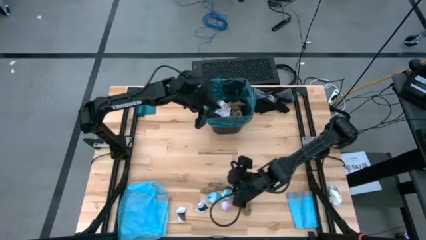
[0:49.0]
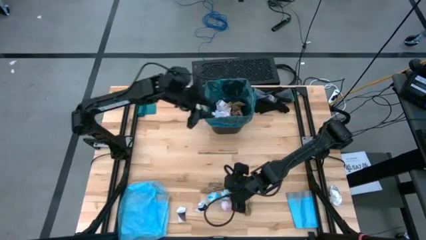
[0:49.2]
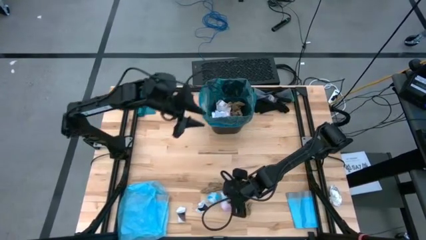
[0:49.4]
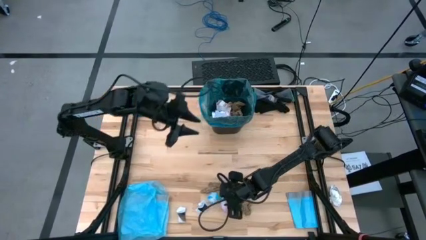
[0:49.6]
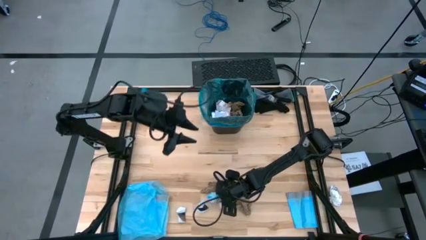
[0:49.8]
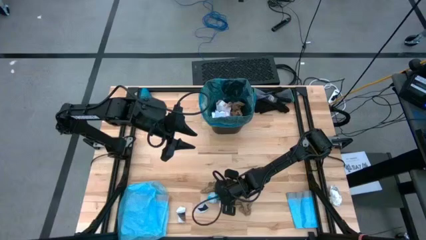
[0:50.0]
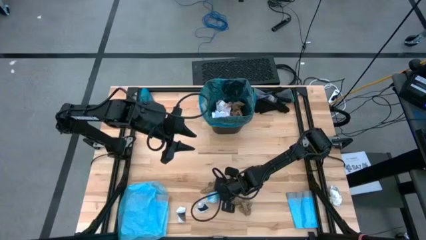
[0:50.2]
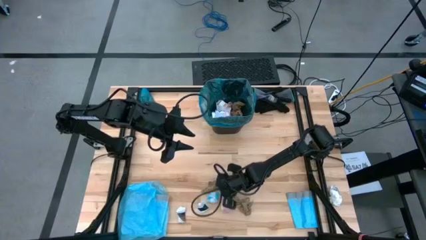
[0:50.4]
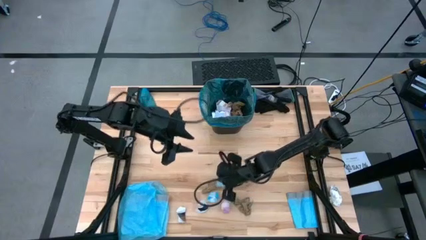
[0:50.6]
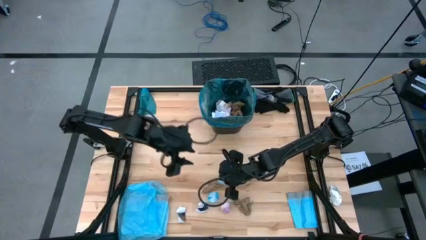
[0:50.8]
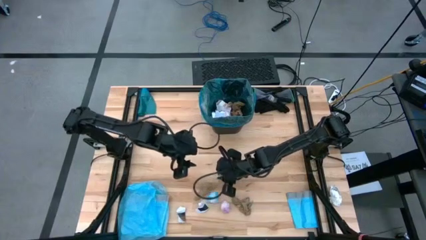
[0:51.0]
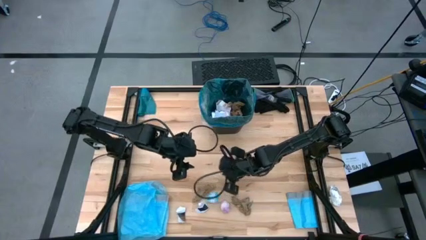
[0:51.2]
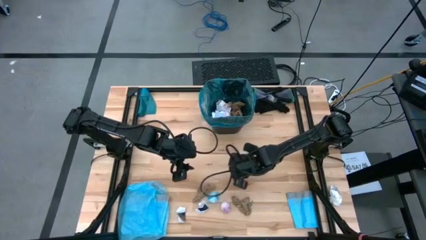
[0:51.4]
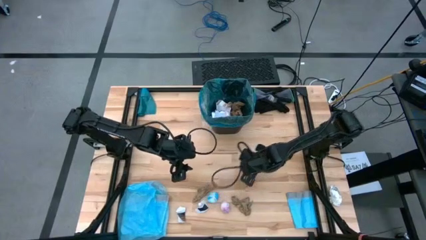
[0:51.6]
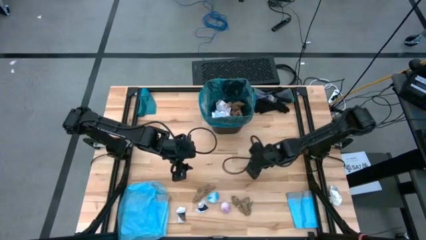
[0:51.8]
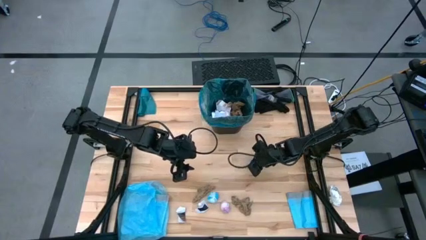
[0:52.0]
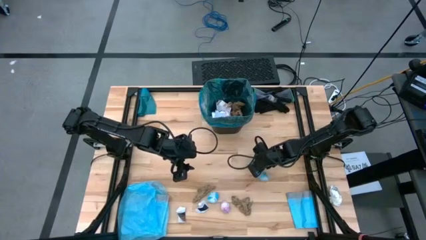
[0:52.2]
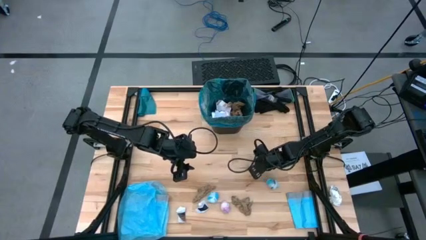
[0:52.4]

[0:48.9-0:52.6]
Task: place trash/remove bag and relplace
Put the blue plastic into the blue trash bag inside the black trash bin

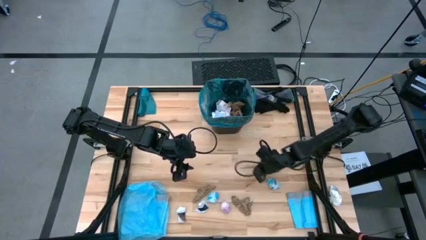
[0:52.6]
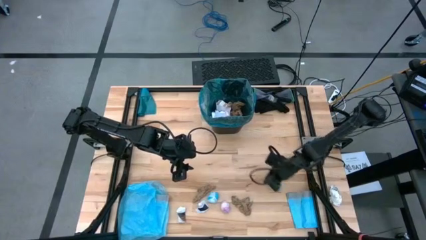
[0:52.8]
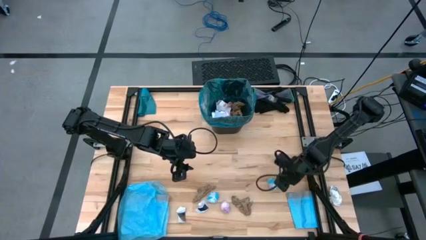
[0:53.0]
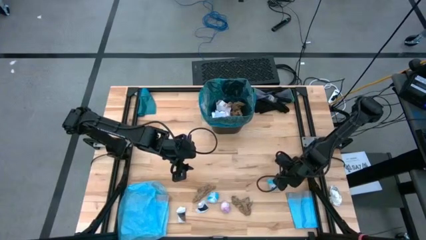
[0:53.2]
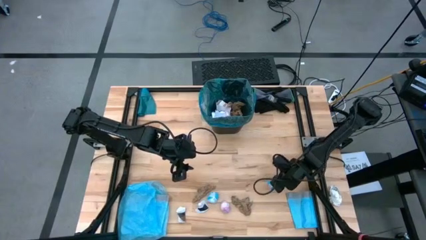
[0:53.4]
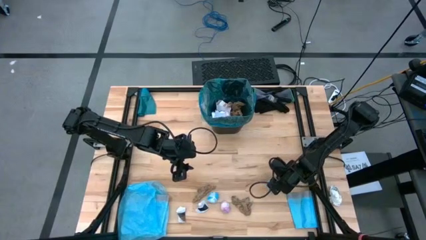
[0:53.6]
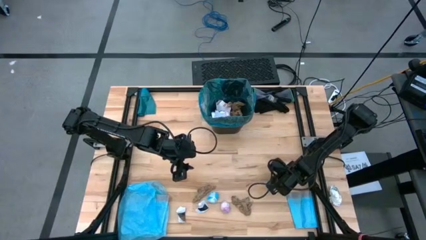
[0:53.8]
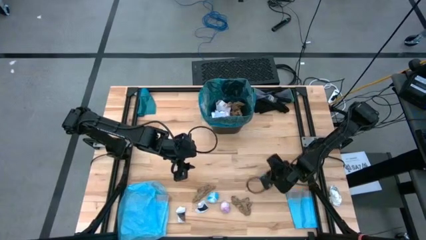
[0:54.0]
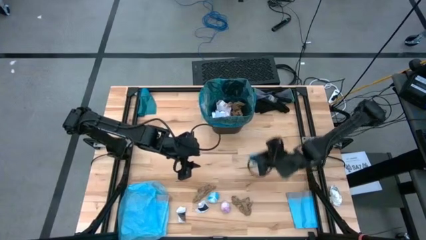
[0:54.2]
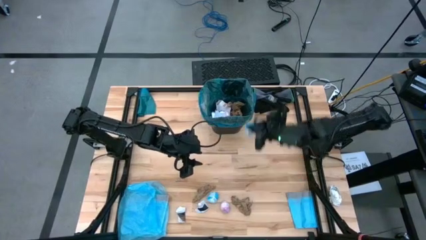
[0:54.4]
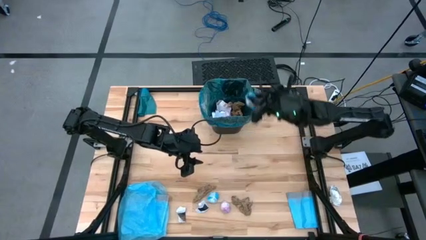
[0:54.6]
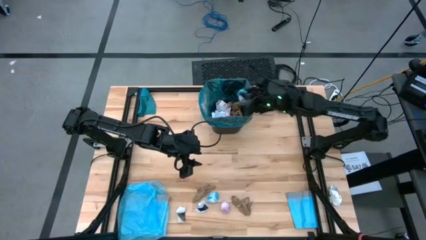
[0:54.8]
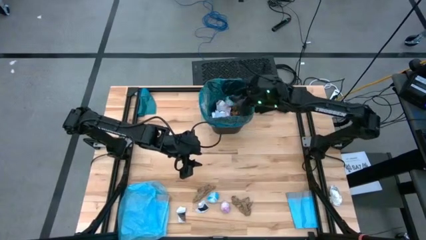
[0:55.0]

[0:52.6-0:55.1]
Put the blue plastic into the blue trash bag inside the black trash bin

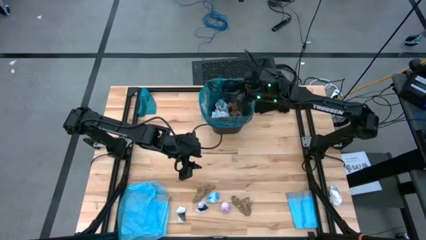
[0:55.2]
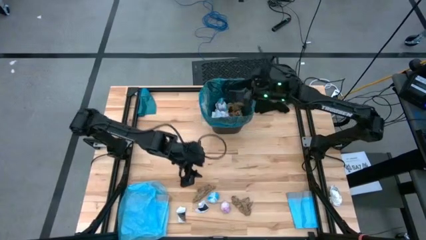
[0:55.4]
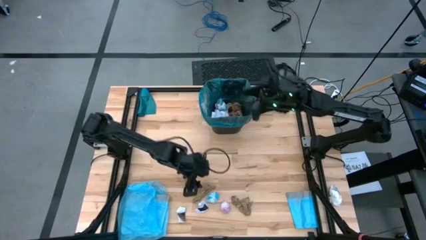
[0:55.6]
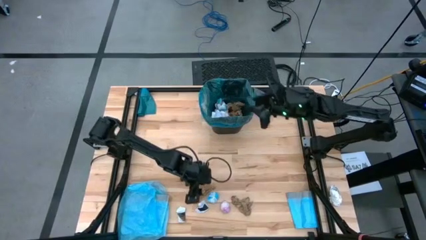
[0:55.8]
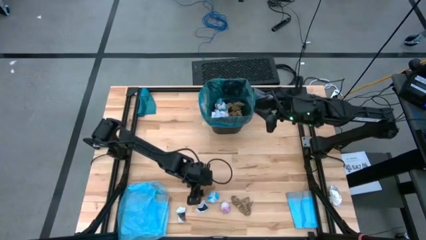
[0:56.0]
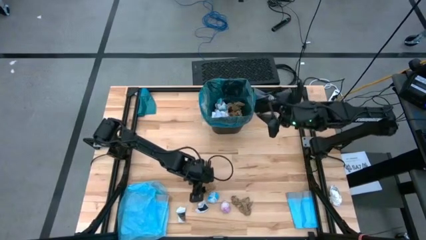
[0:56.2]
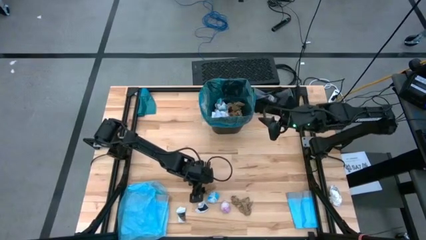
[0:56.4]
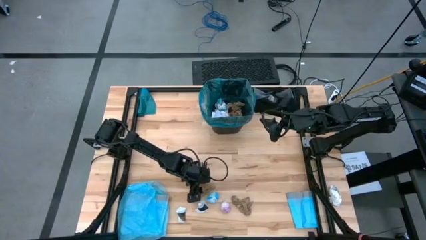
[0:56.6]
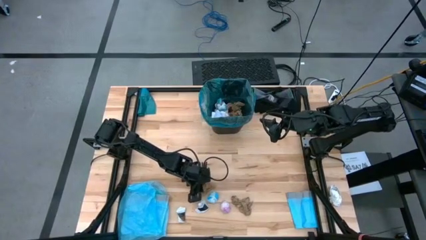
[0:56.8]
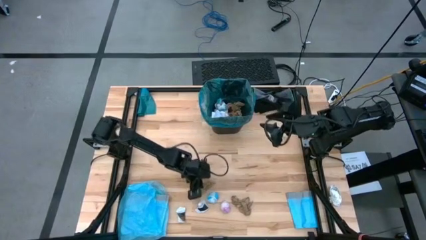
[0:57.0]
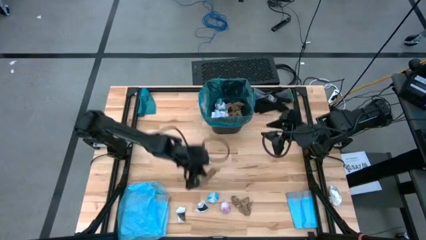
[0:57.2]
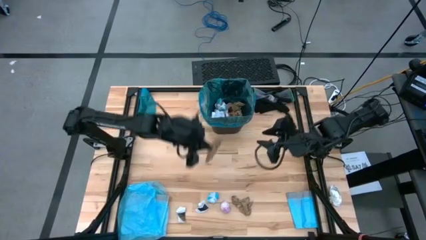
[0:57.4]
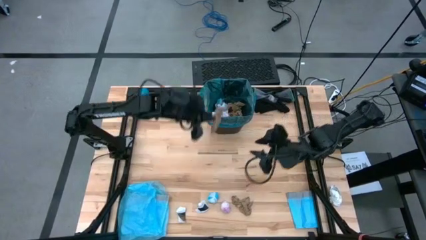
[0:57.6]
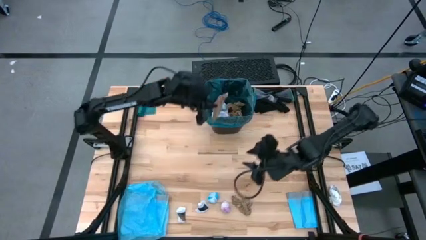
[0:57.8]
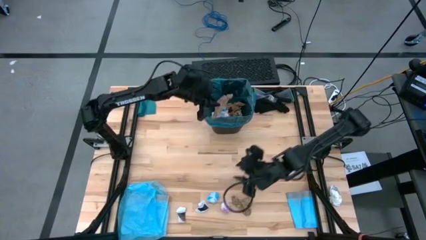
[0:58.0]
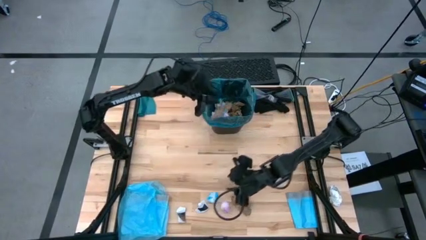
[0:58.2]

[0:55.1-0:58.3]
Put the brown napkin into the blue trash bag inside the black trash bin

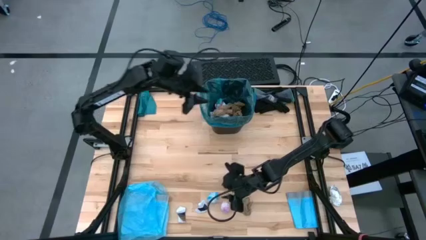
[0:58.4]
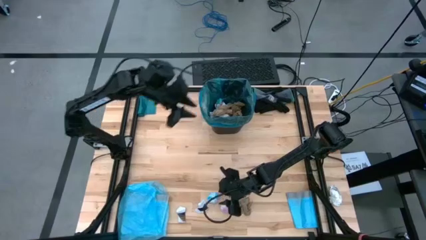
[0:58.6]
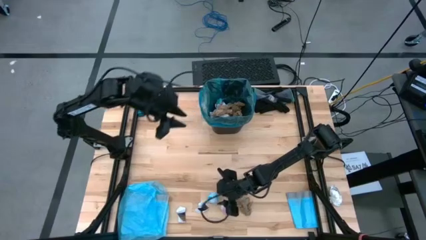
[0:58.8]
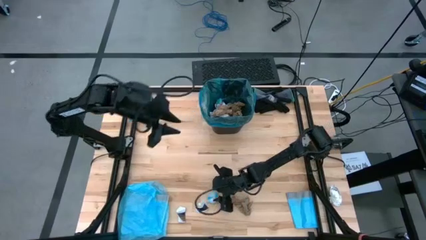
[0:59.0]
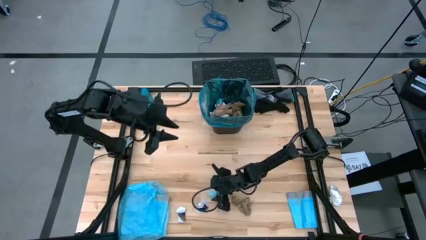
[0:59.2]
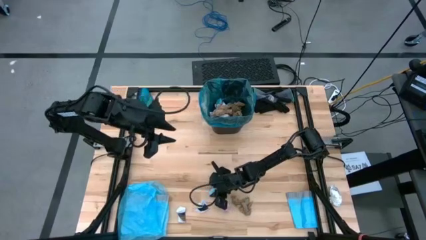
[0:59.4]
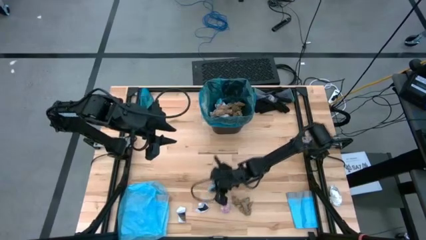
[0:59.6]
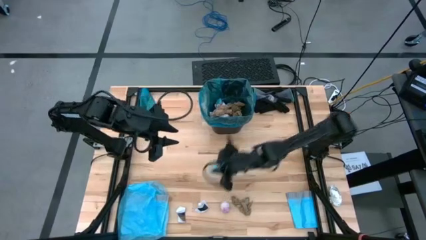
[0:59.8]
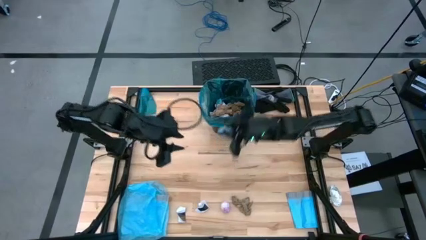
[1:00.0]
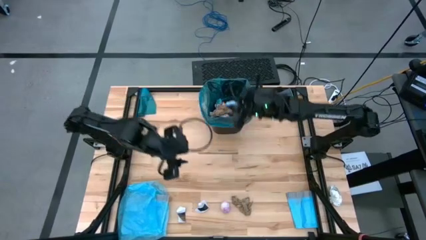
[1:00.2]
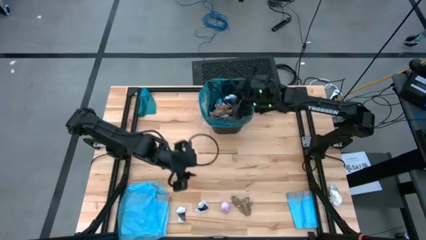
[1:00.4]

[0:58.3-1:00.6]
Put the blue plastic into the blue trash bag inside the black trash bin

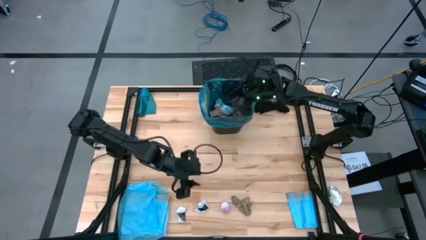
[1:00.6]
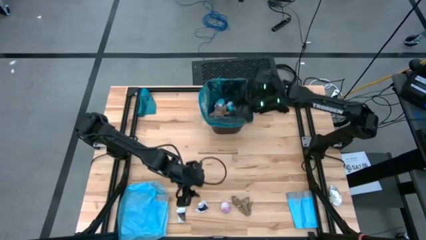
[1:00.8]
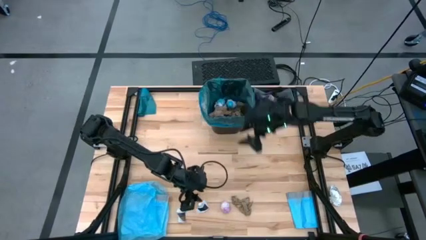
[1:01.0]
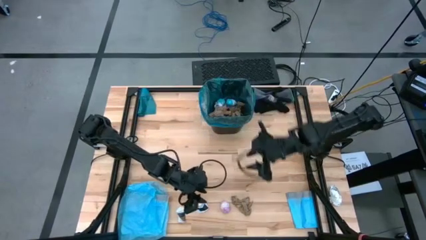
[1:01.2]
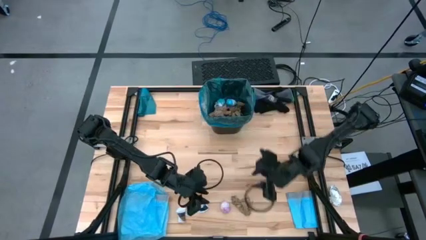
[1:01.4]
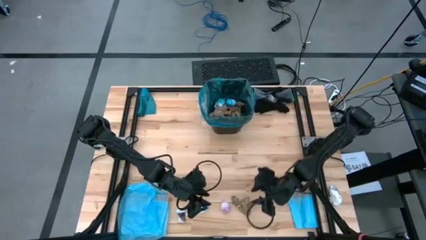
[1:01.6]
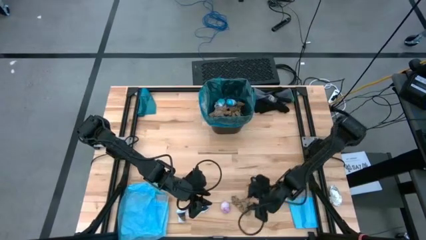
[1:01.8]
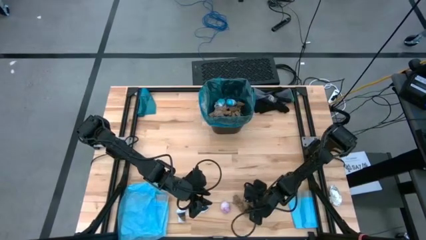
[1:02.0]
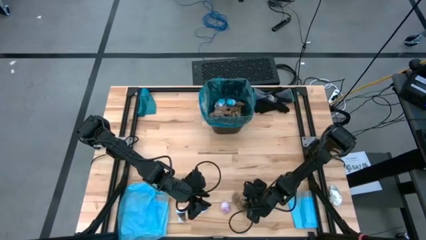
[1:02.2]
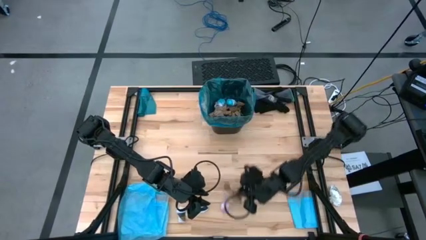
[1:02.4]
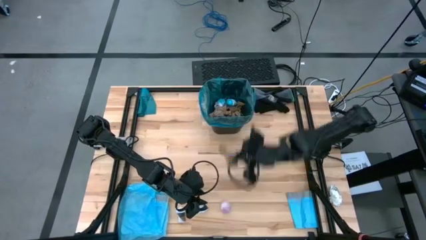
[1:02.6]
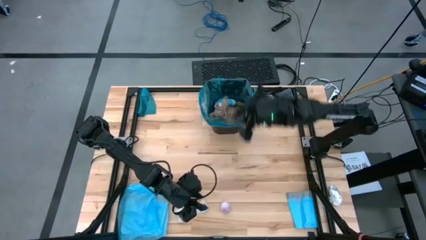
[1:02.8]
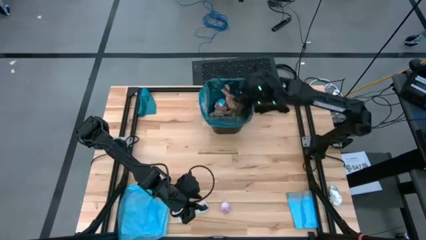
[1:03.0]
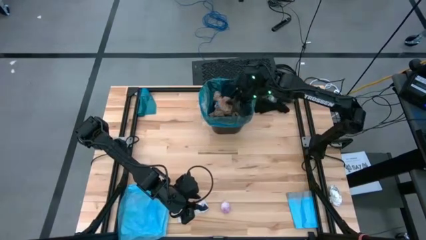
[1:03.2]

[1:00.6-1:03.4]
Put the brown napkin into the blue trash bag inside the black trash bin

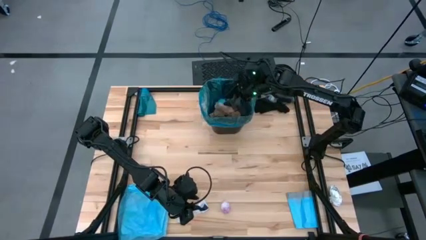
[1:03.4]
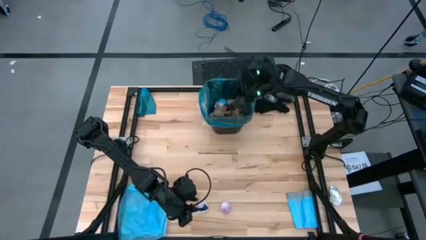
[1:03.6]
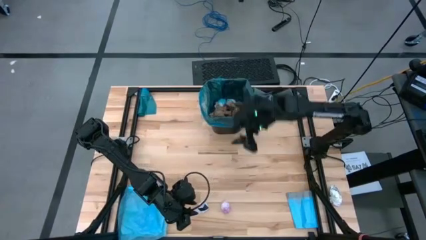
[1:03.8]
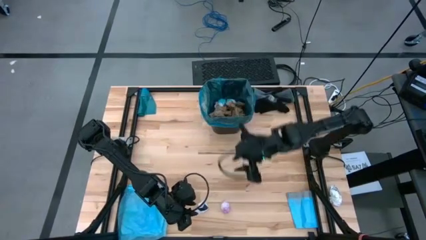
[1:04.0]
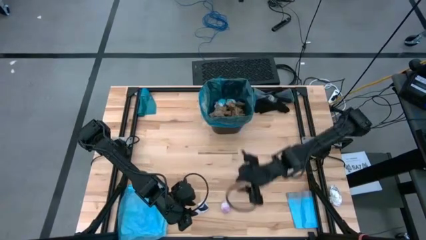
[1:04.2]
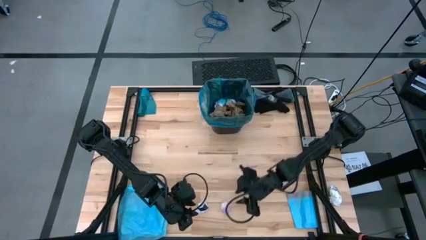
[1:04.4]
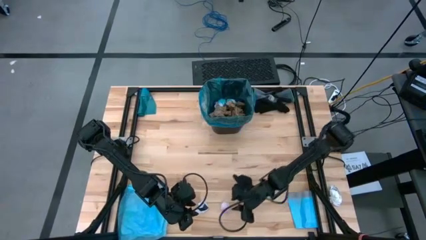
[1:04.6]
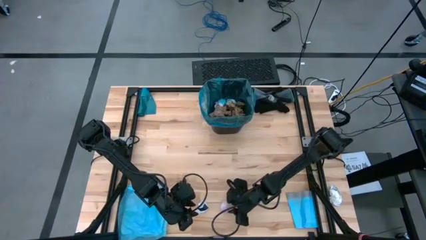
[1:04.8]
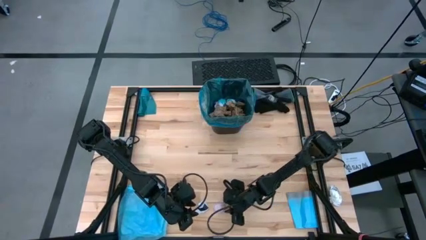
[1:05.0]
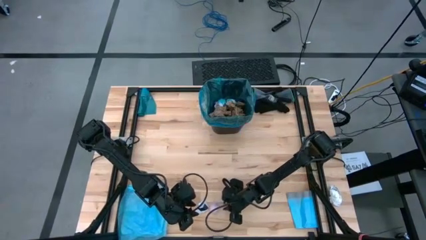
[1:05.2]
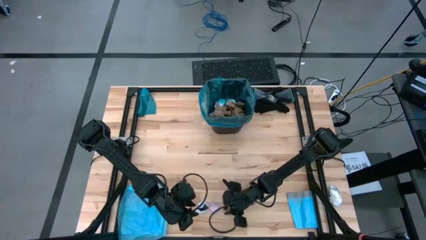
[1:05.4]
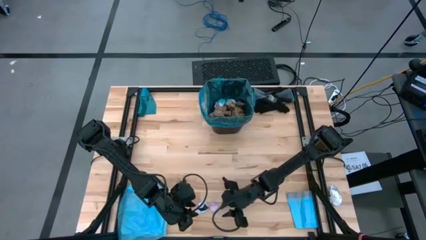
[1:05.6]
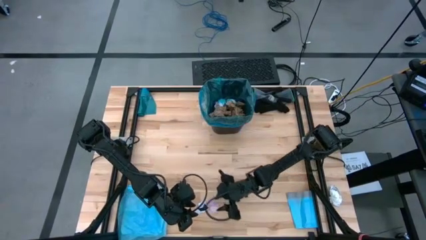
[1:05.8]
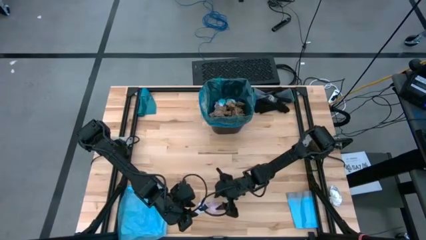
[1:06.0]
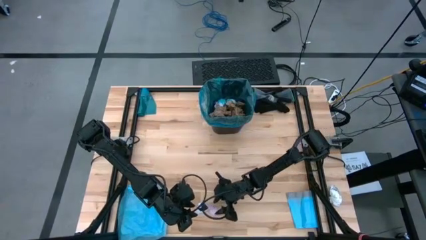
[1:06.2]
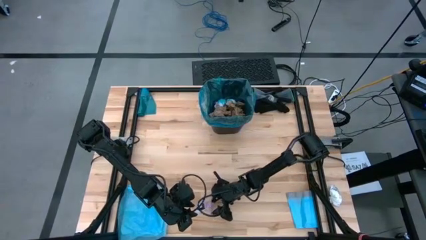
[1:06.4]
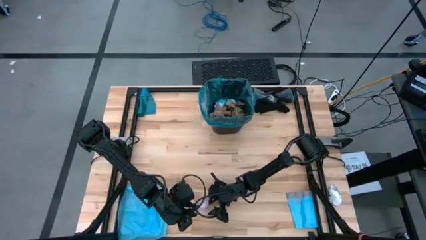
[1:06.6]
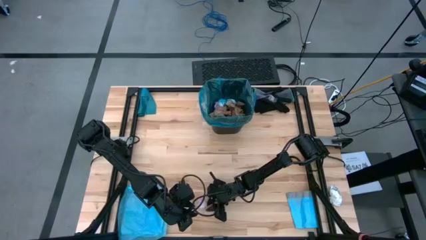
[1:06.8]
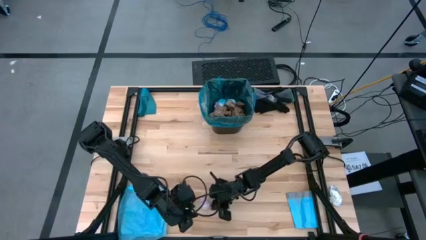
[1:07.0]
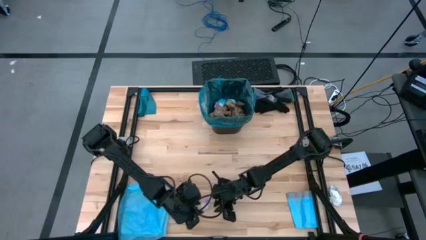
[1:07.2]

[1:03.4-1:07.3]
Put the pink plastic into the blue trash bag inside the black trash bin
